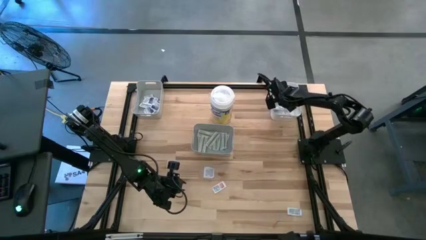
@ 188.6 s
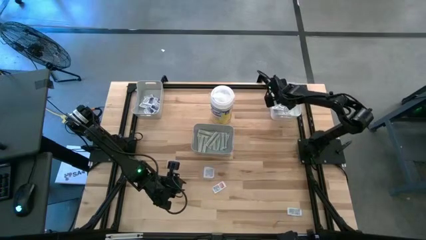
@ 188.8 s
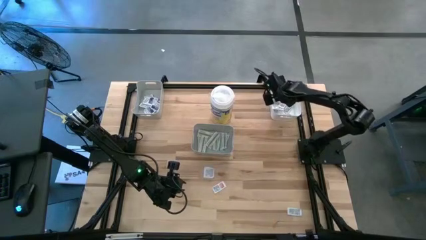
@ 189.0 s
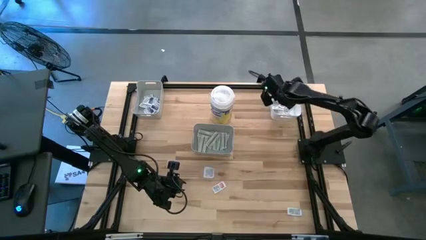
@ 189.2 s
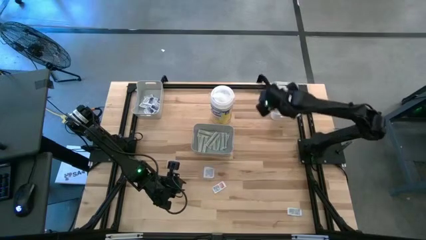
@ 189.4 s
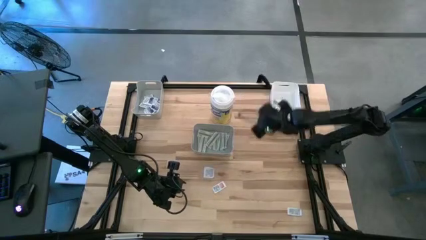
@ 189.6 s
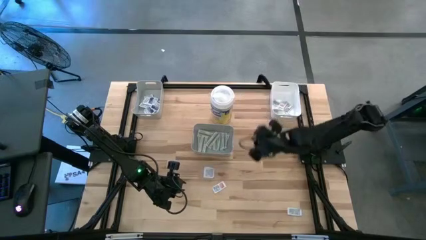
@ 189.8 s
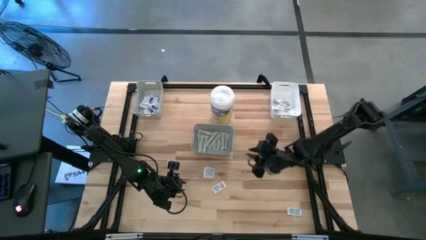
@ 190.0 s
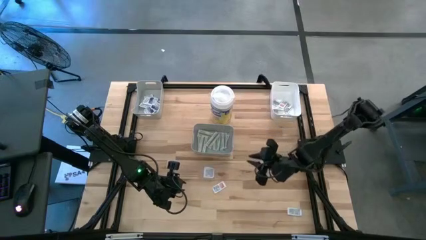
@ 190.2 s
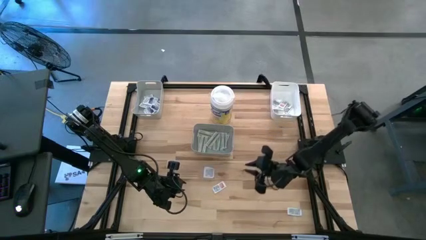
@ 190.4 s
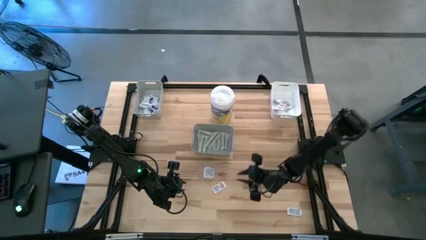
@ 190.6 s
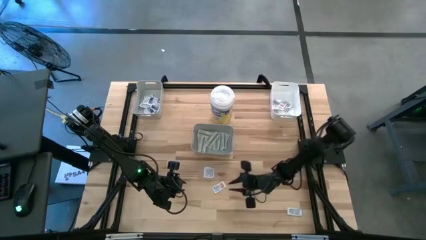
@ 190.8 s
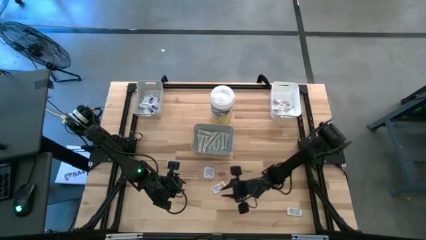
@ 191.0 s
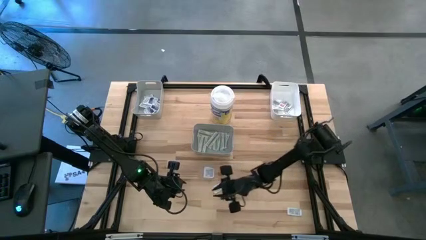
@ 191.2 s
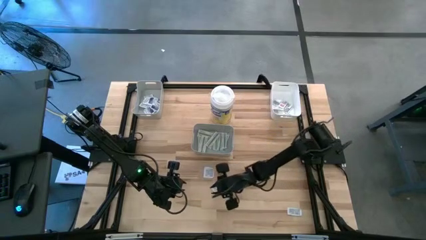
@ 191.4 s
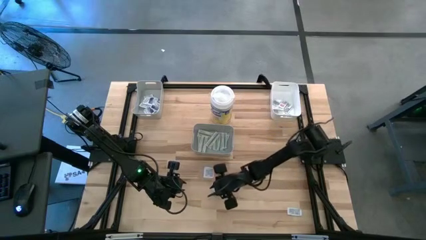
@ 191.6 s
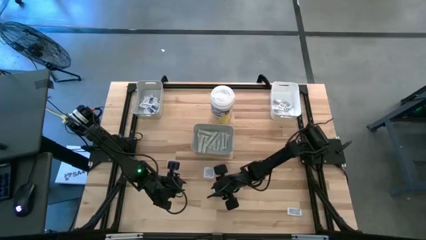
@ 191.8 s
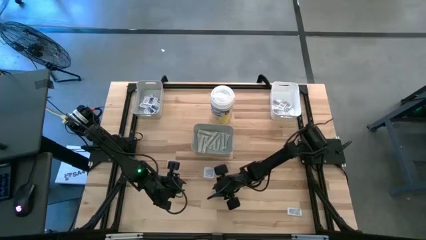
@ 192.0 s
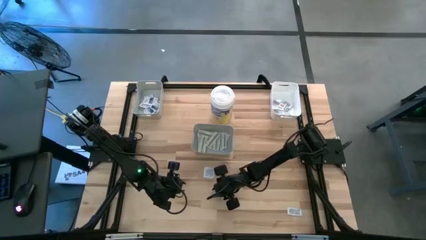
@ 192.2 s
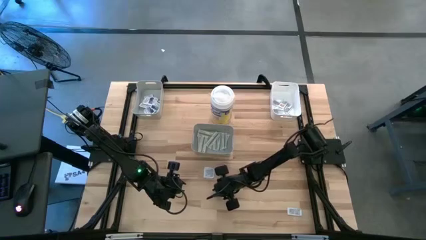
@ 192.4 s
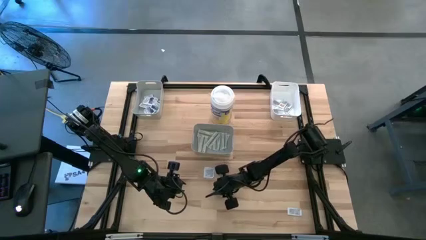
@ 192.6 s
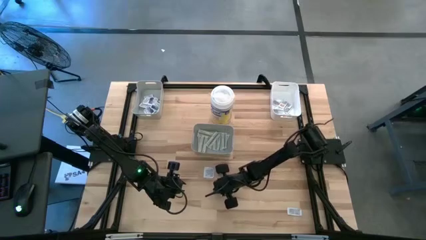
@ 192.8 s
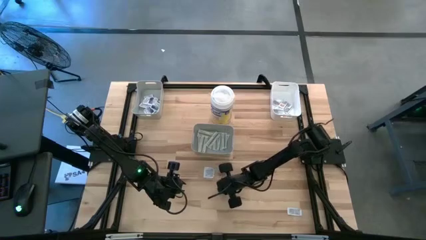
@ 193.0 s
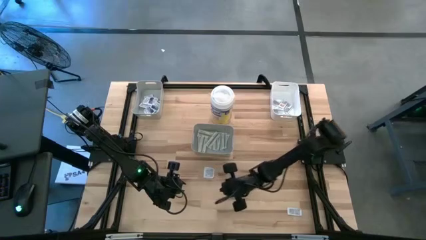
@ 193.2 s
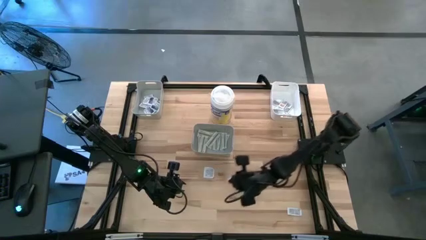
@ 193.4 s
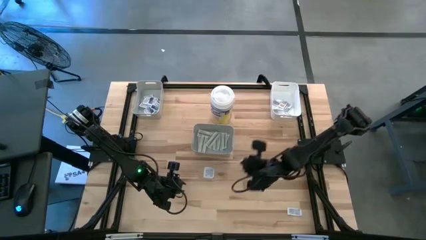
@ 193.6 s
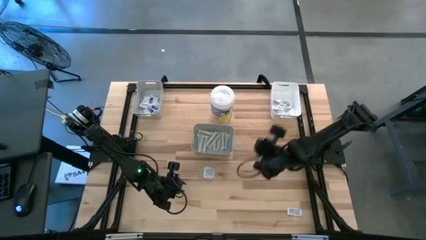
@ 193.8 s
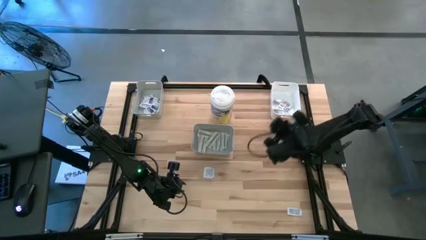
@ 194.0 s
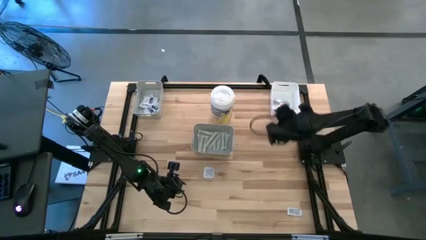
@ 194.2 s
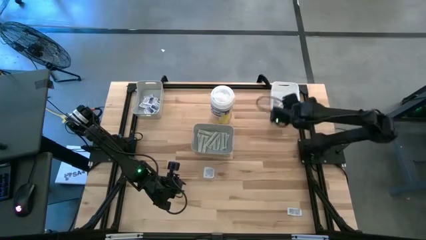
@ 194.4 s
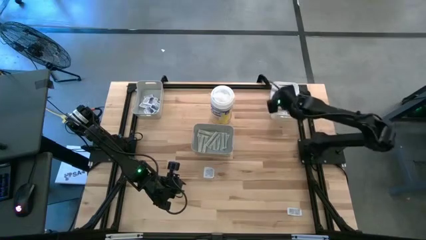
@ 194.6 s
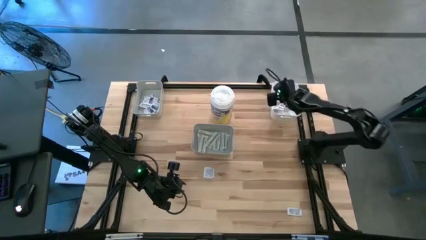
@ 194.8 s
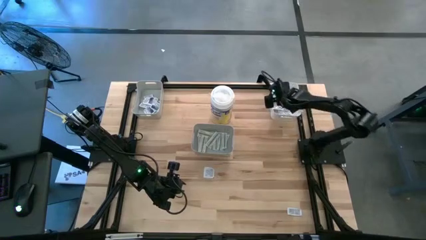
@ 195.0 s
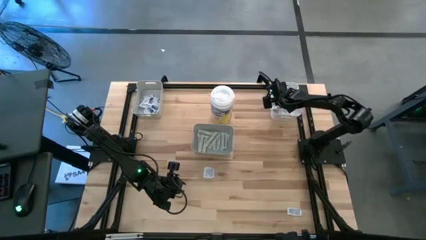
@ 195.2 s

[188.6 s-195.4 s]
Task: Pick & Place First Aid Supplies
Put the ointment pack into the white bin

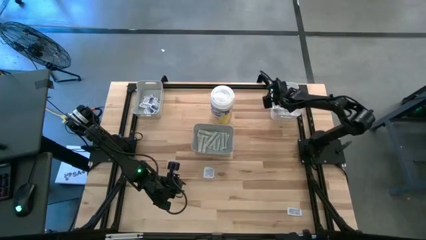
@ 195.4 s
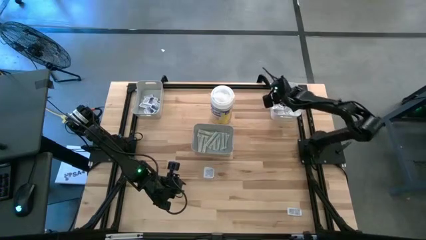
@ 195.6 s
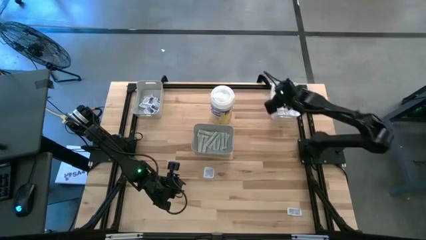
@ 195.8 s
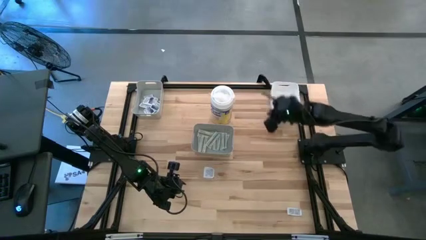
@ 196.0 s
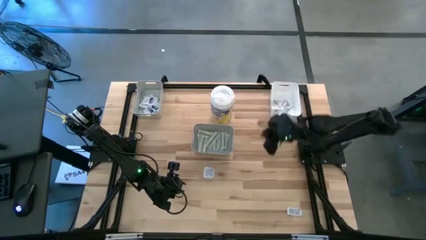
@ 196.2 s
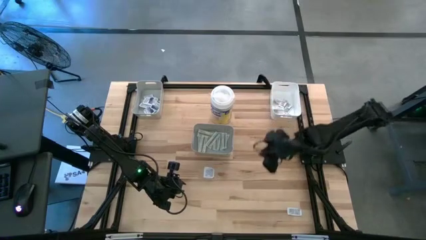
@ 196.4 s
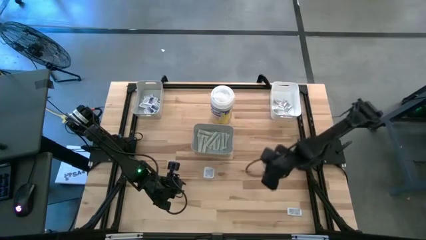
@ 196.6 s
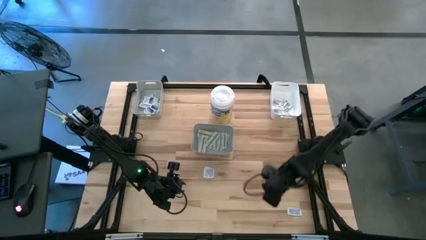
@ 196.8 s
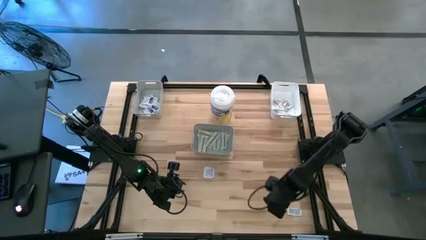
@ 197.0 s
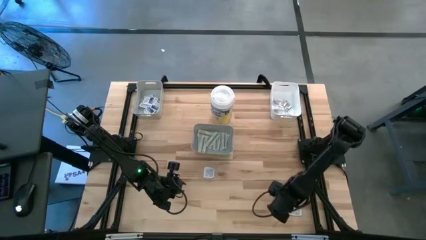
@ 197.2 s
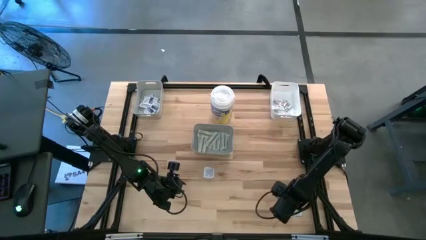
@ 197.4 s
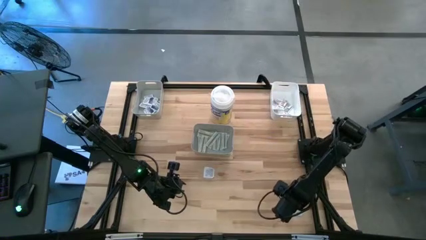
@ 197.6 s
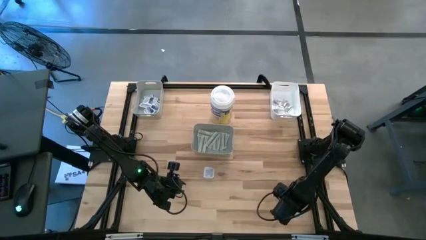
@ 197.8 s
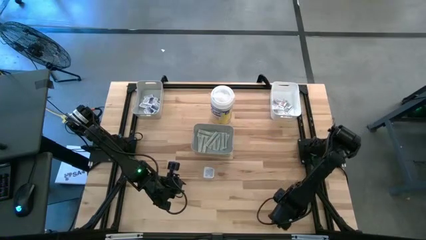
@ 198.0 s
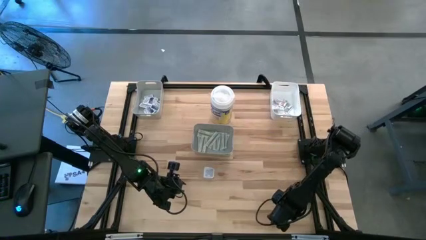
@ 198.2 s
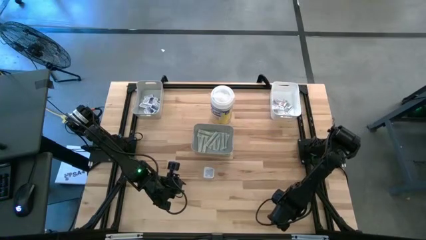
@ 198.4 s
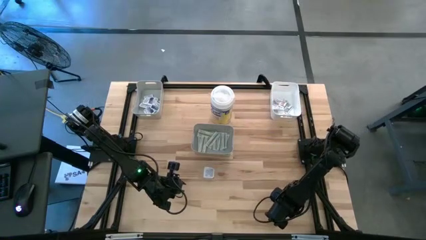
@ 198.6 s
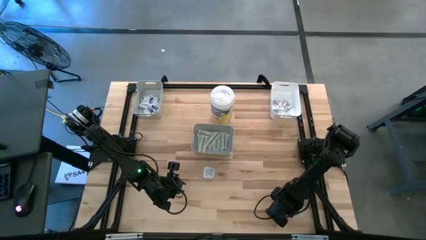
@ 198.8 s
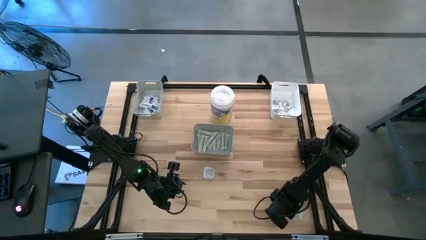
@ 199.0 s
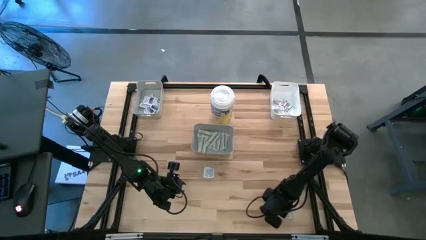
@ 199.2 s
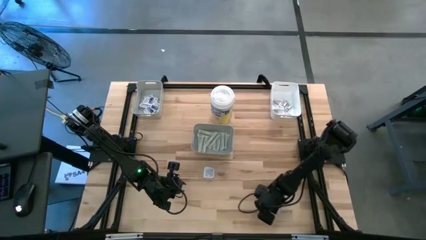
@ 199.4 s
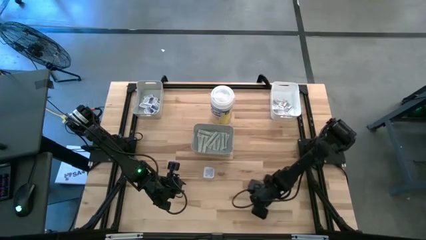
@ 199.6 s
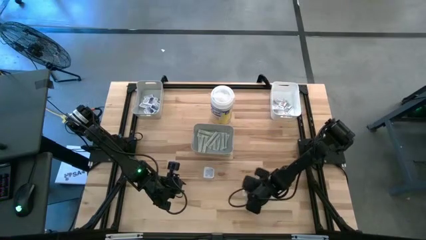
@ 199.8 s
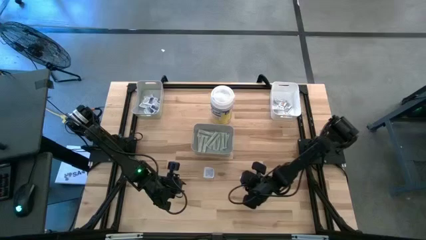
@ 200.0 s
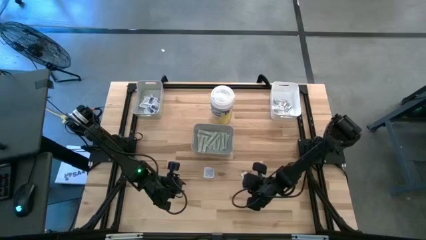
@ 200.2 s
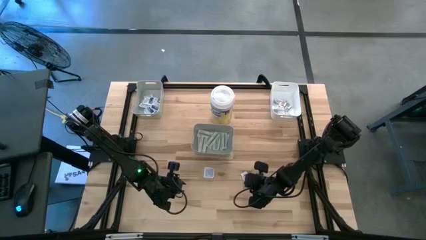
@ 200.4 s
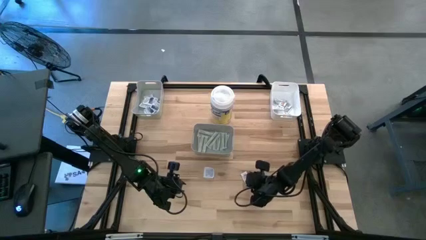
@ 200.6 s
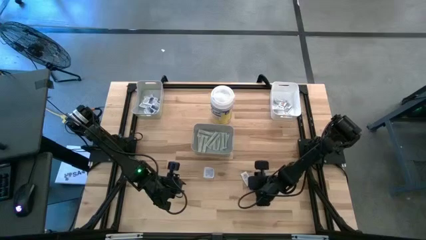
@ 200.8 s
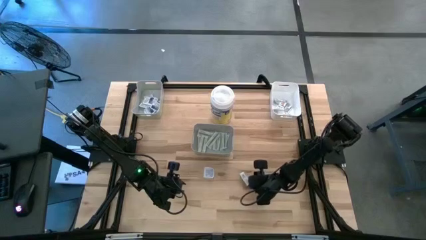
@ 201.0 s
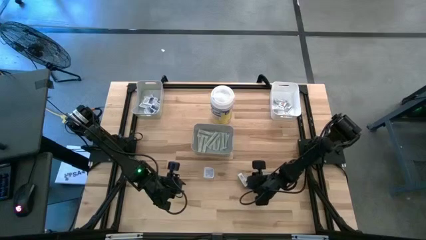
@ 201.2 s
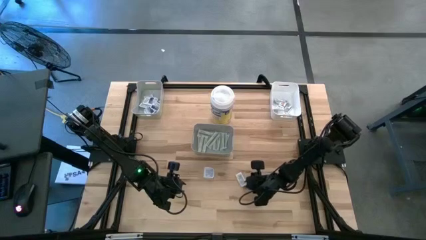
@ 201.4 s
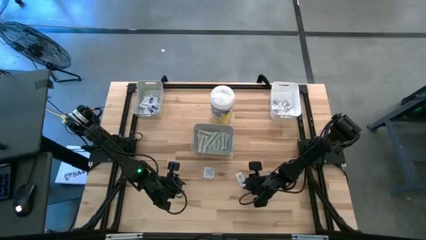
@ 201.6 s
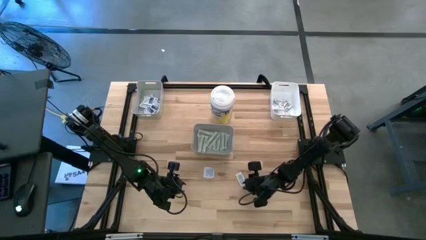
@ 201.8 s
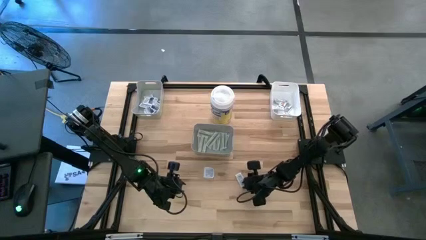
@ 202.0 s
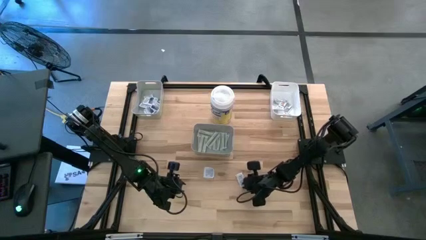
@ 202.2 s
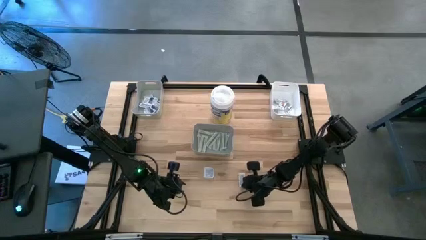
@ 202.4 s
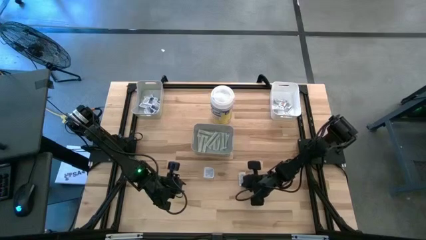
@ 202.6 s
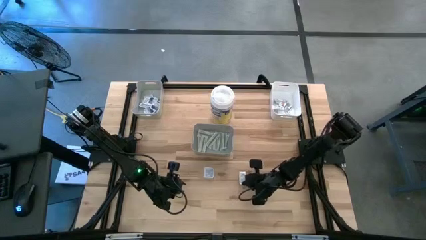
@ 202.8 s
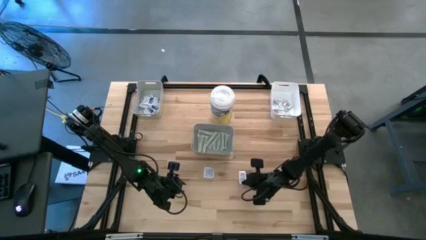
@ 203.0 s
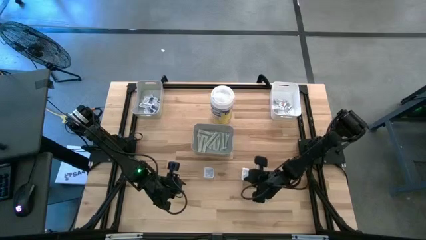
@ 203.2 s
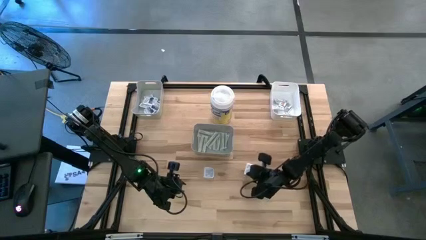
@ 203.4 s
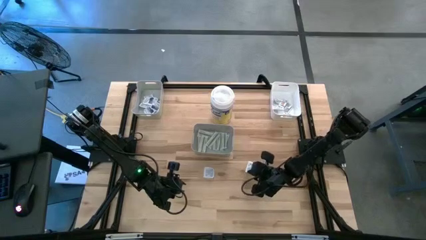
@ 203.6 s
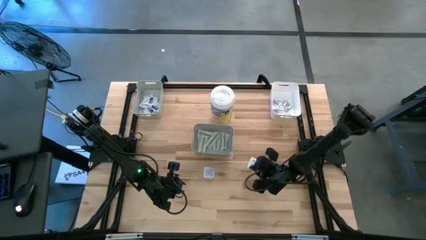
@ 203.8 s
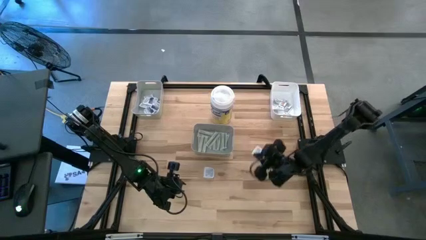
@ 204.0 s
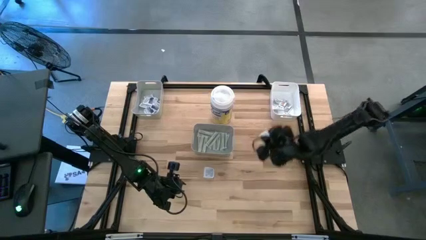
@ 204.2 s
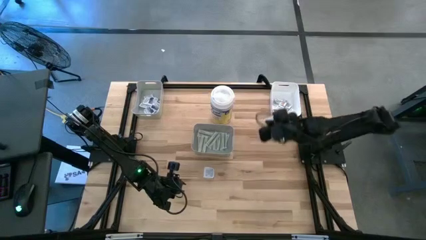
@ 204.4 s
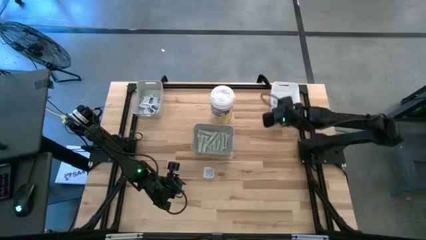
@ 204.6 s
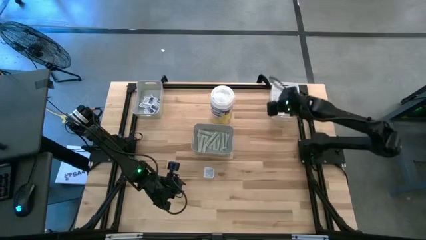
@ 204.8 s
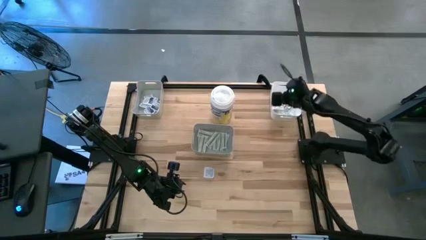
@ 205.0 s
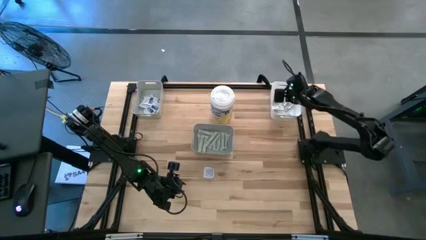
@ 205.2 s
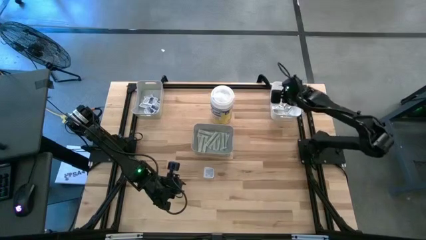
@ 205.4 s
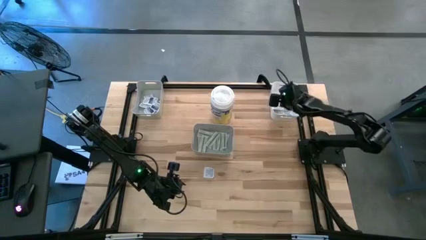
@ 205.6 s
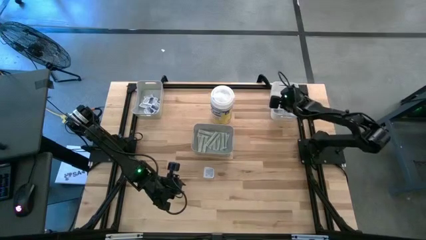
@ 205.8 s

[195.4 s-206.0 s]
Put the ointment pack into the white bin
